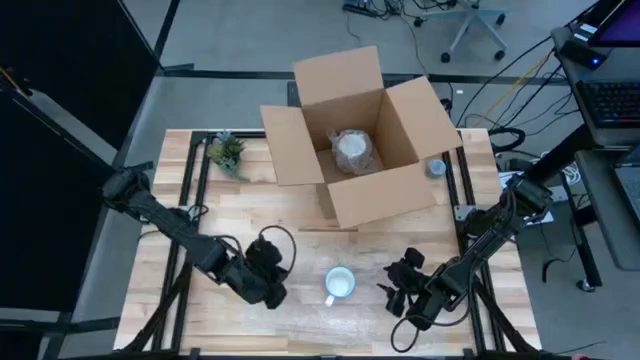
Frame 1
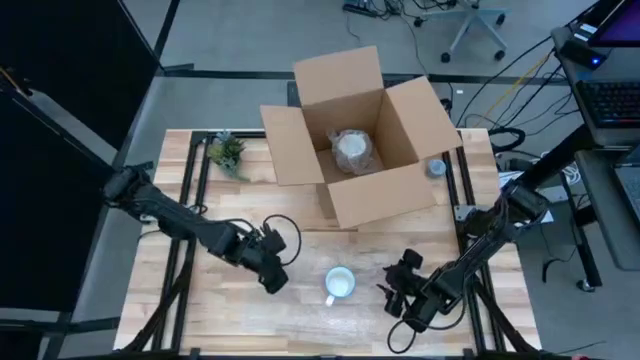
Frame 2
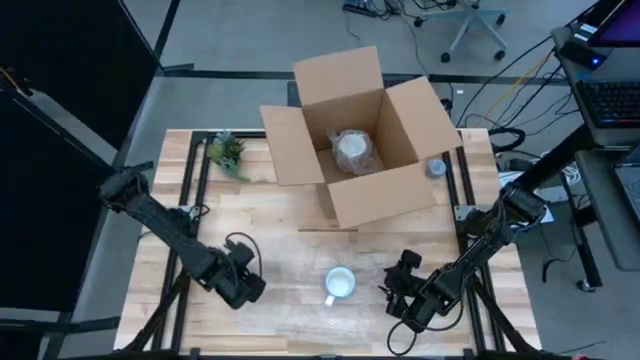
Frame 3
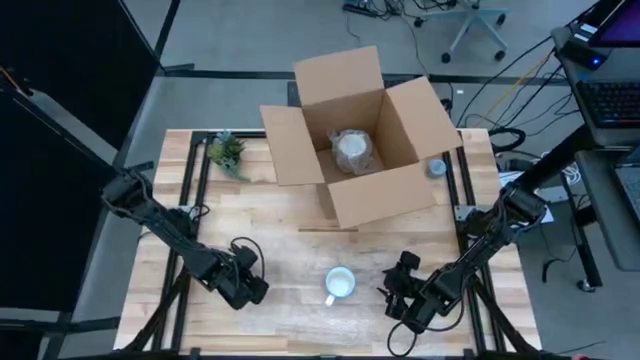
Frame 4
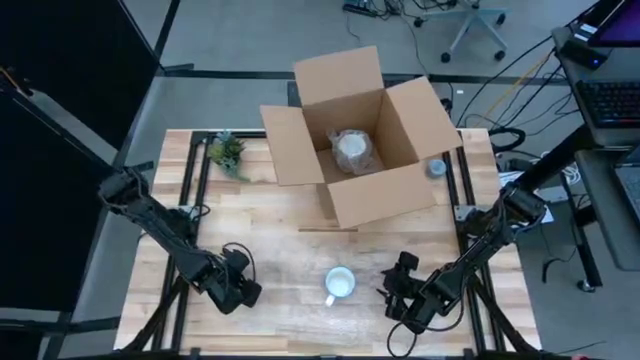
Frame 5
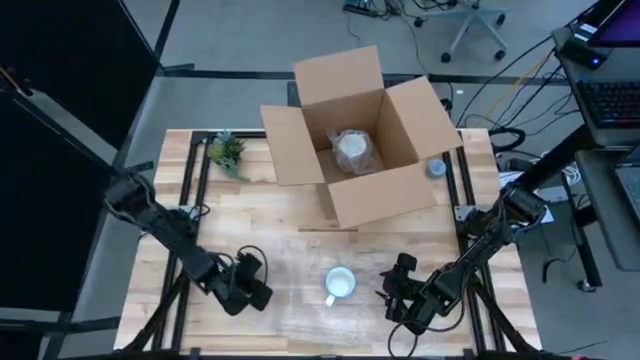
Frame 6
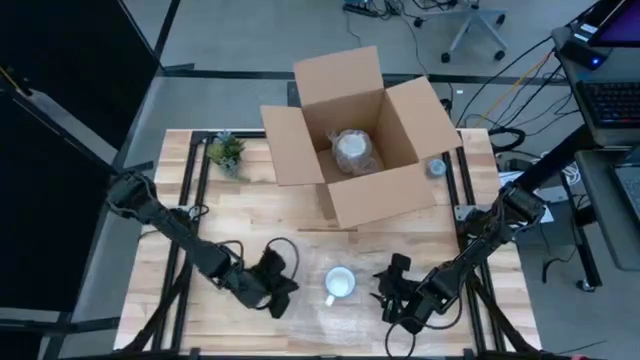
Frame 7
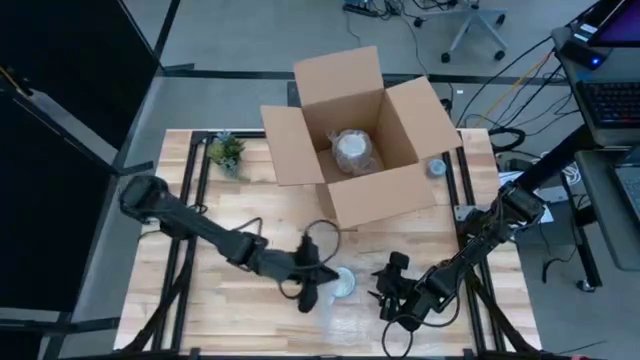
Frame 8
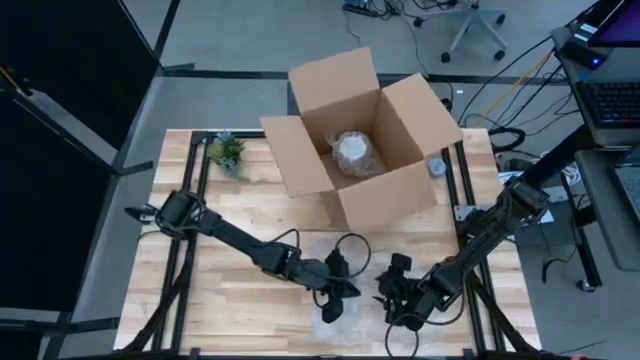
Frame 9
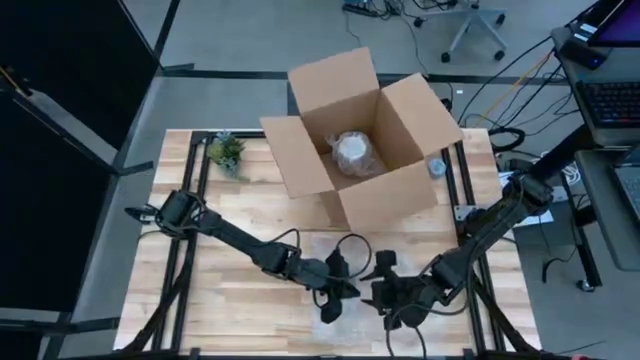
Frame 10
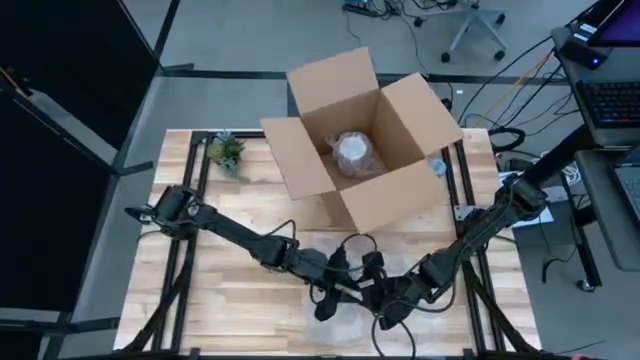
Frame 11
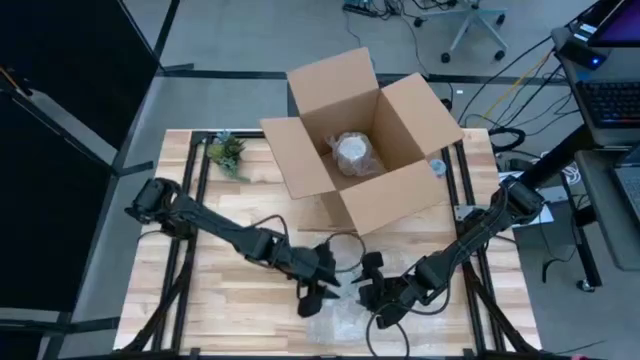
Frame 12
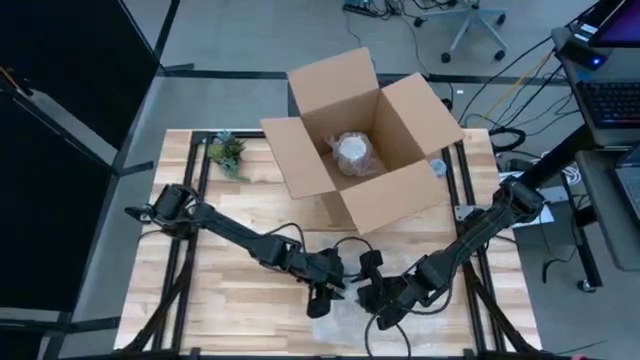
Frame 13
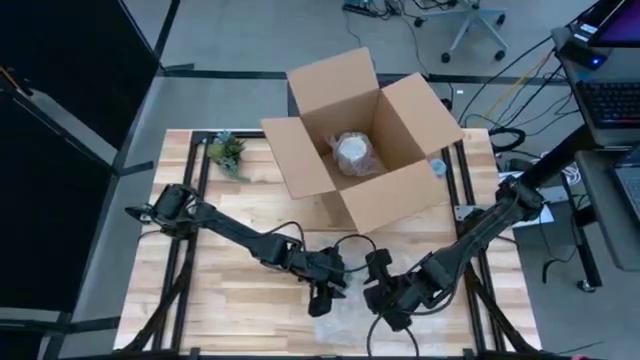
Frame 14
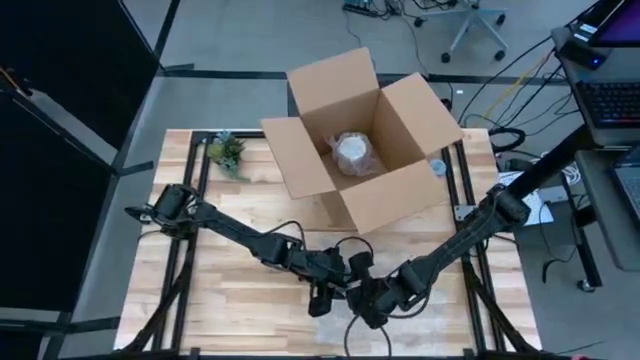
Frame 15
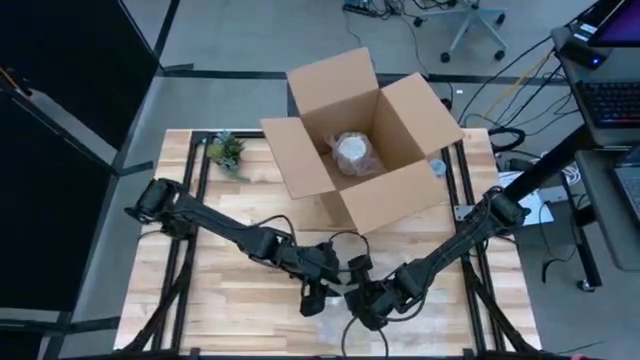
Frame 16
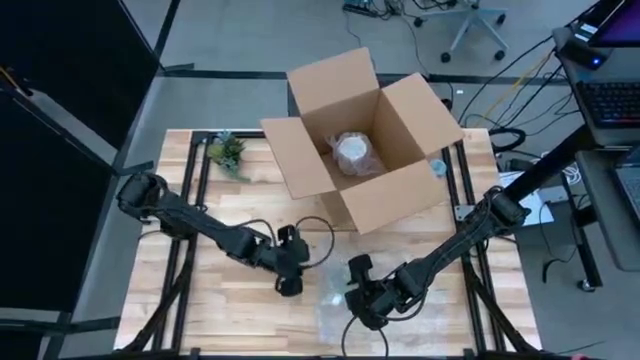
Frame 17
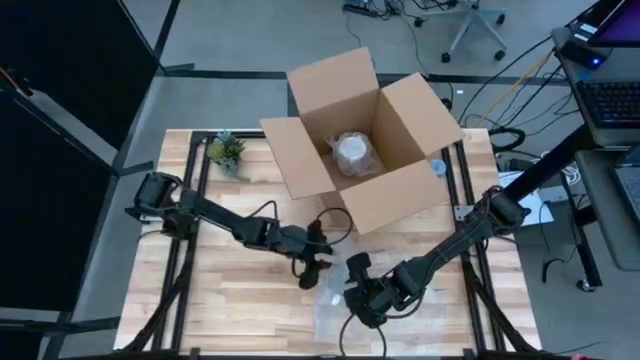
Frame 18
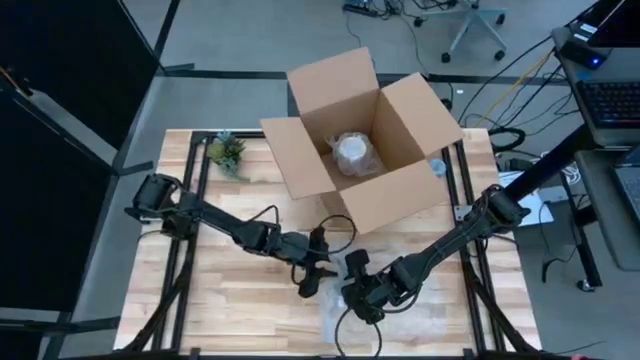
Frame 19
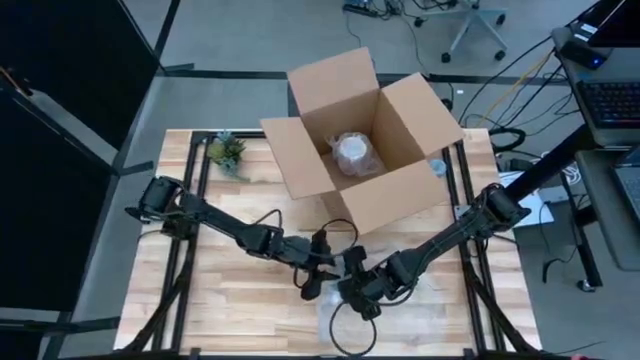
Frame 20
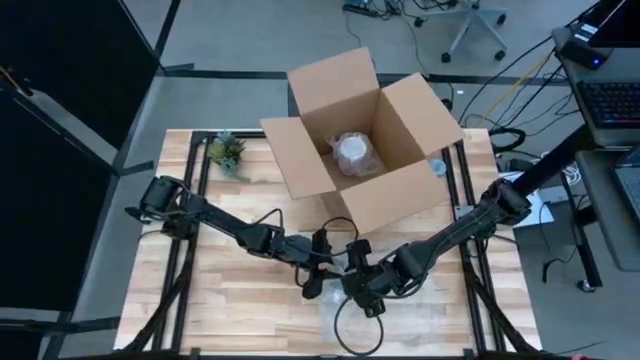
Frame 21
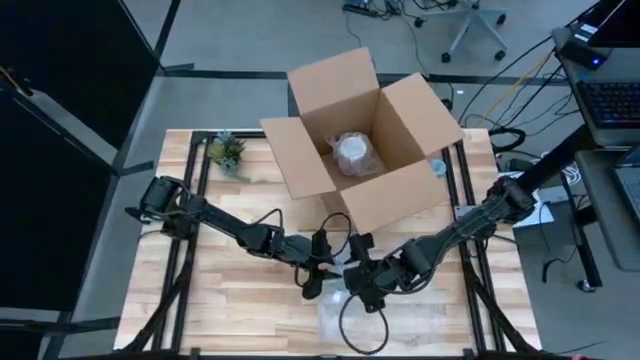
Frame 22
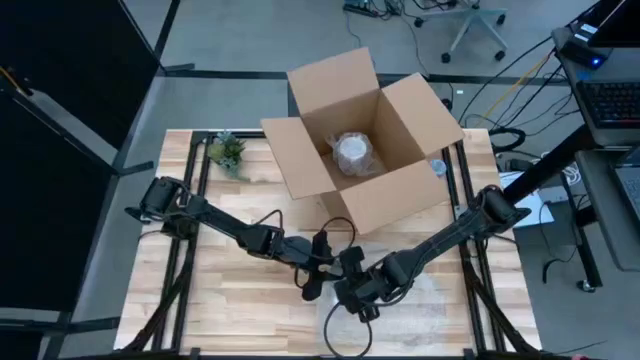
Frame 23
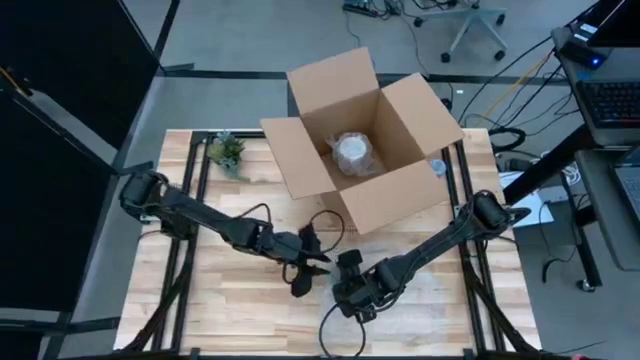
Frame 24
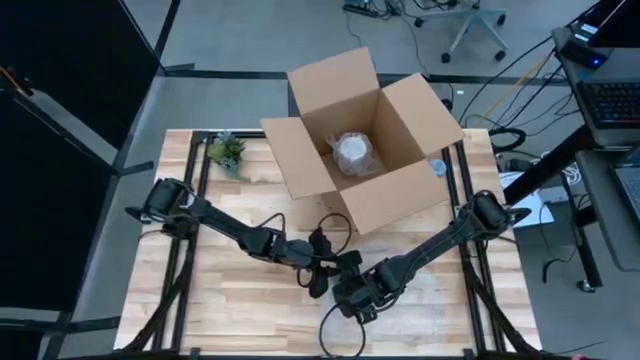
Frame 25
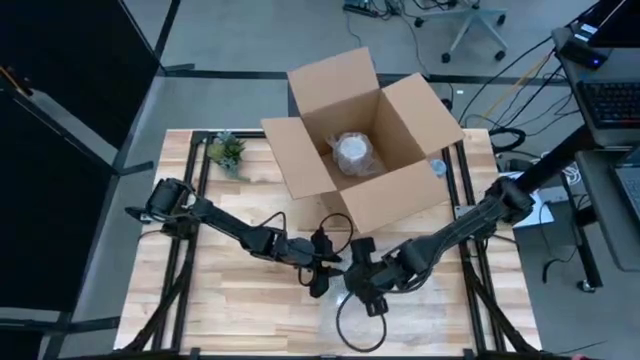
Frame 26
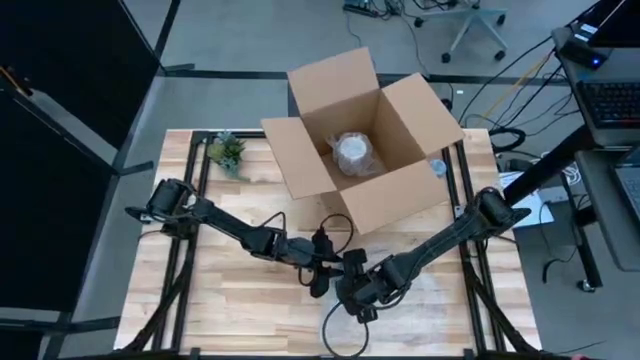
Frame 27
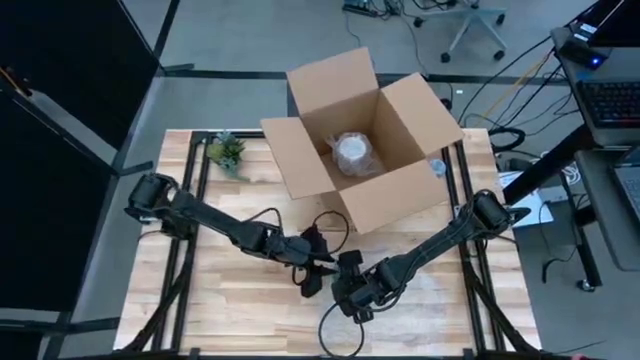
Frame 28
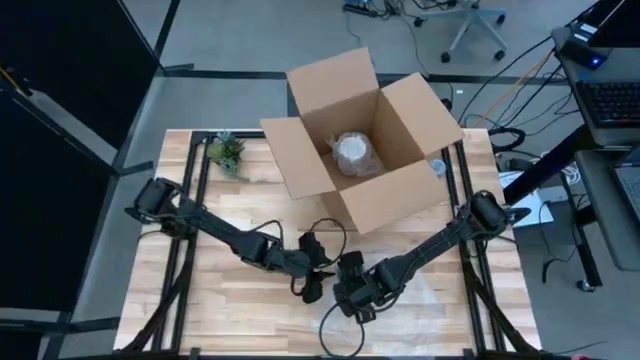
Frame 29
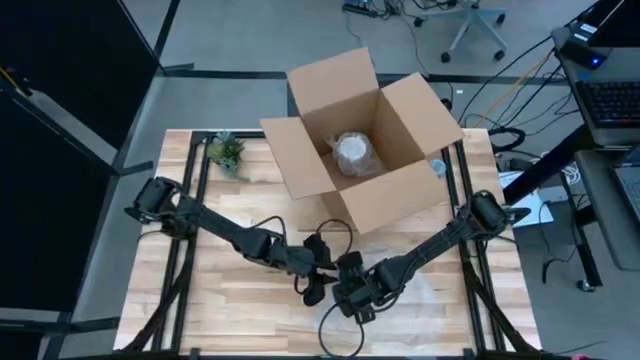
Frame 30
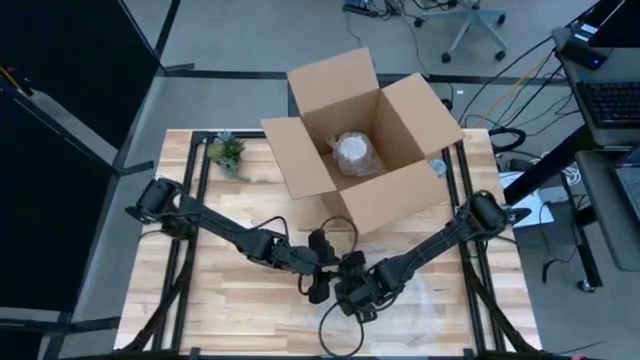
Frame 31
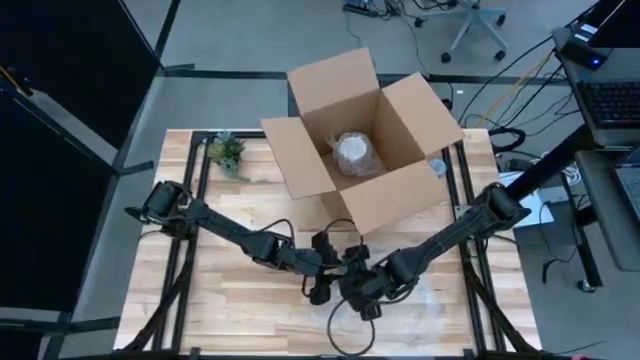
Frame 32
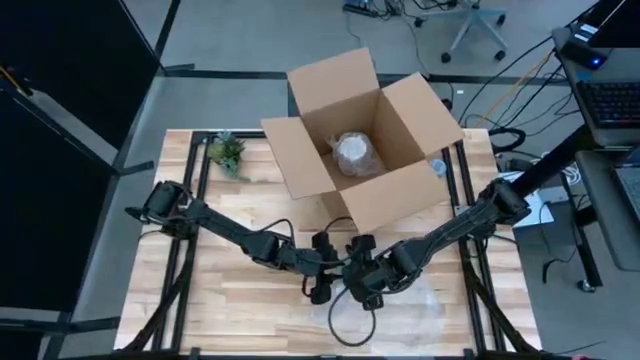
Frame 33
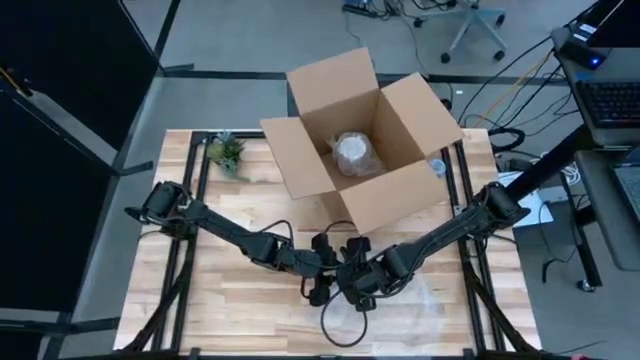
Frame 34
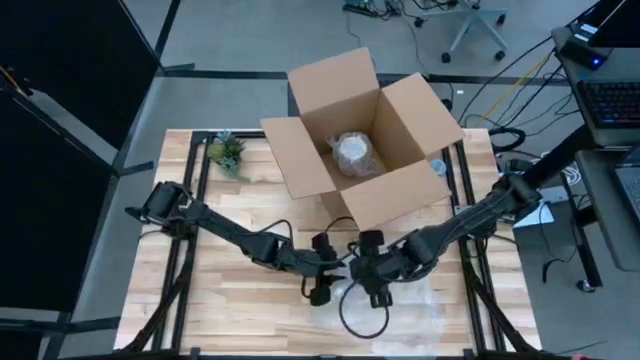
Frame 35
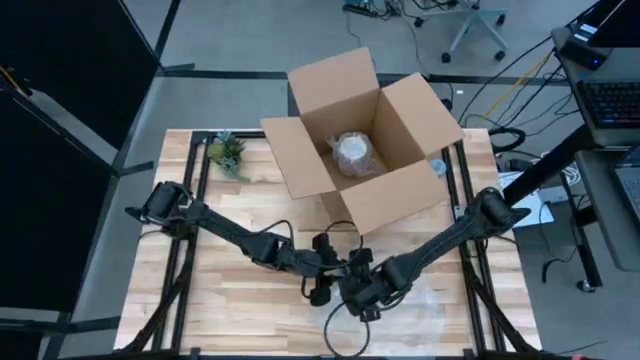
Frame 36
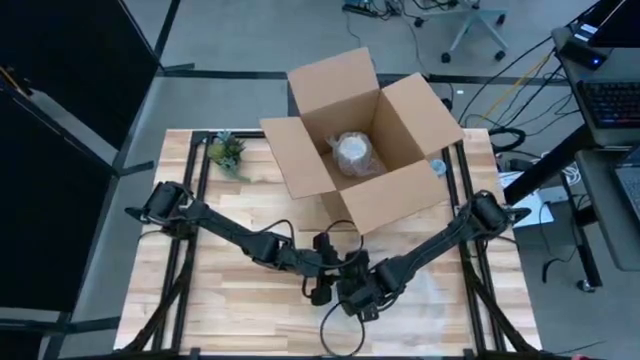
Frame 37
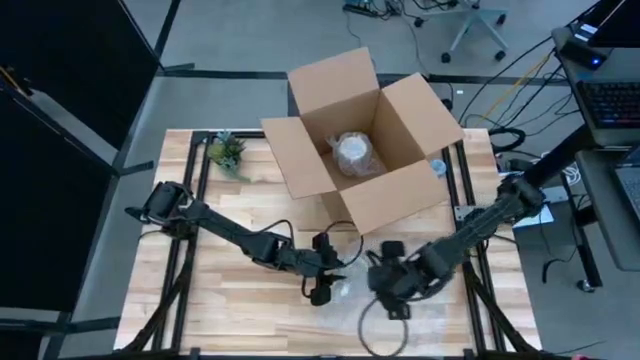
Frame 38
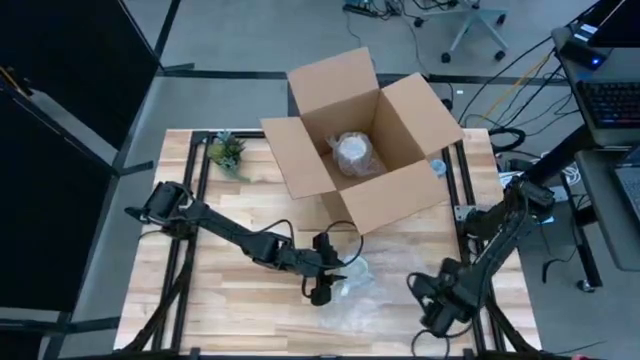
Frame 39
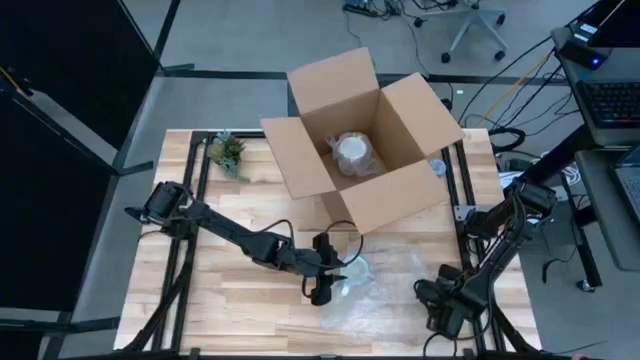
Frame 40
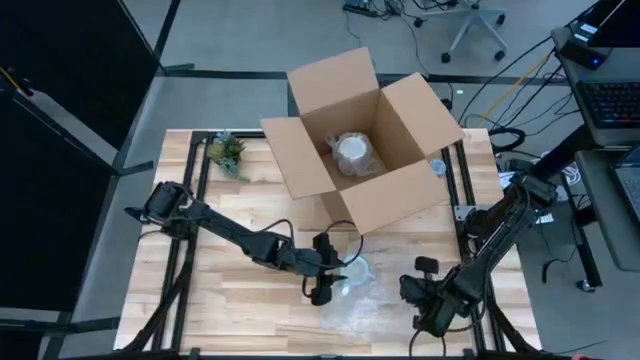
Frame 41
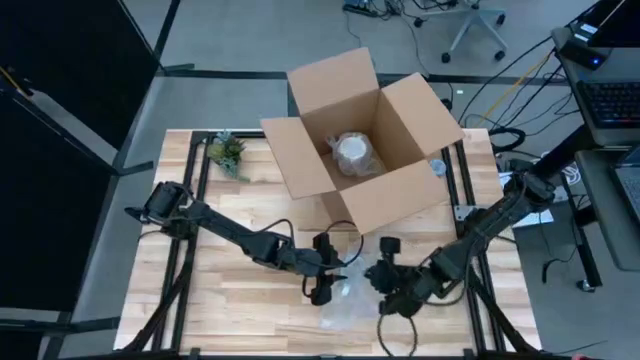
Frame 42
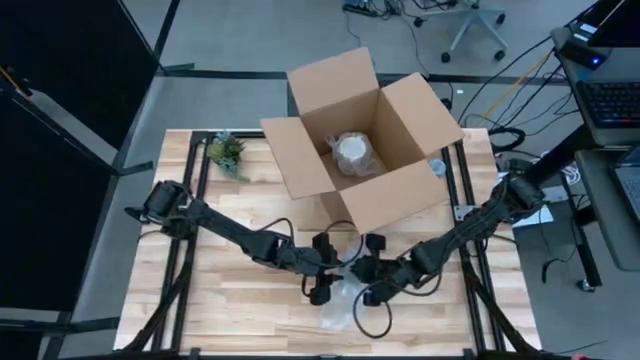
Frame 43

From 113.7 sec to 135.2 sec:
Task: wrap mug
Wrap the red mug with the bubble wrap

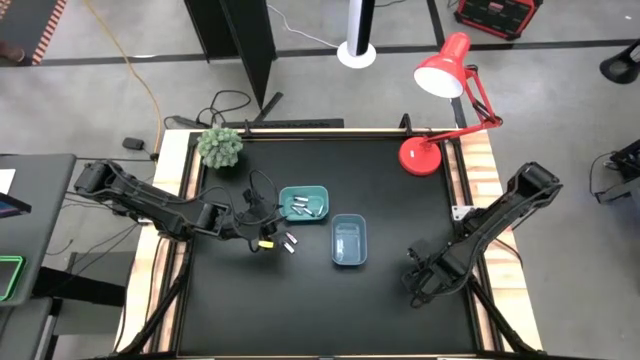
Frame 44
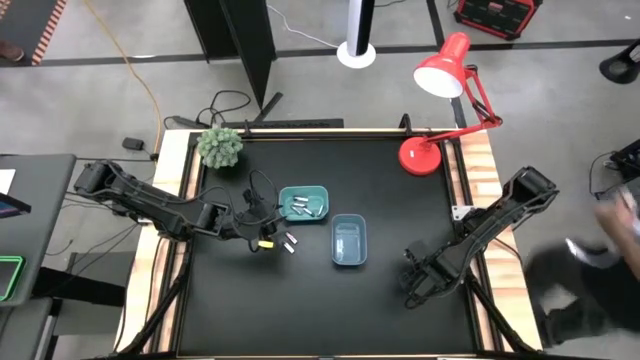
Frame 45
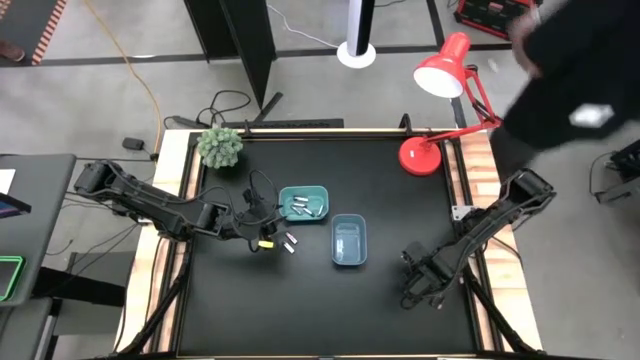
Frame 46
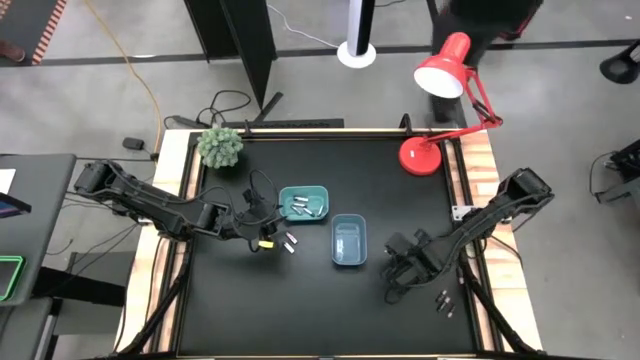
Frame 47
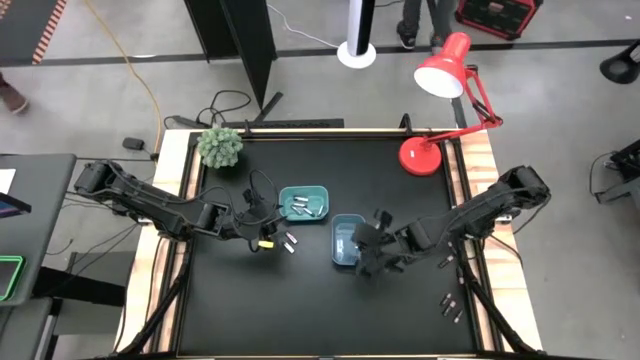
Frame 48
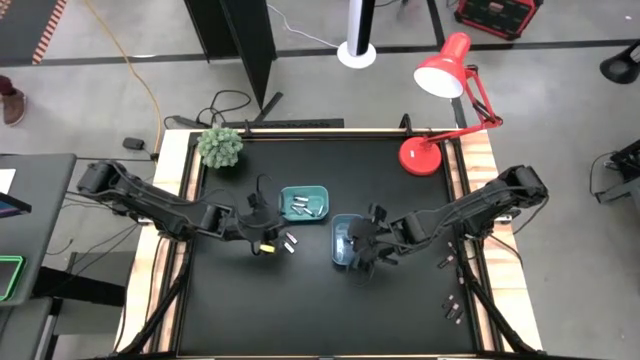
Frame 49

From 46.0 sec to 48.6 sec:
Task: Sort batteries
Put the black battery into the dark blue bin
